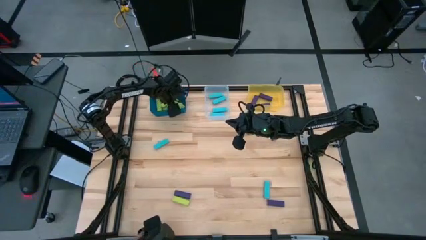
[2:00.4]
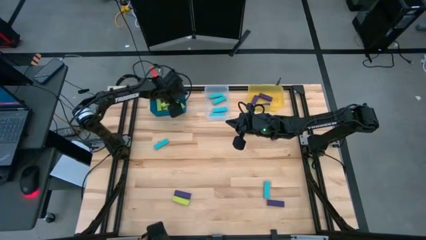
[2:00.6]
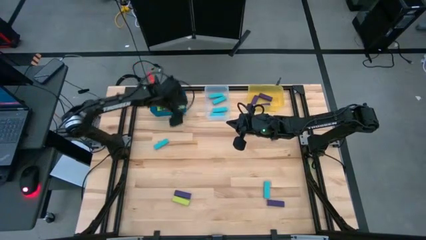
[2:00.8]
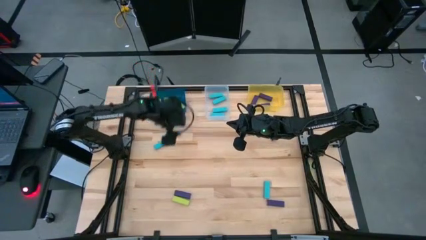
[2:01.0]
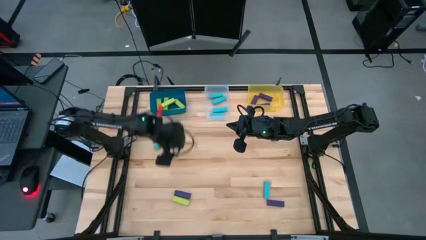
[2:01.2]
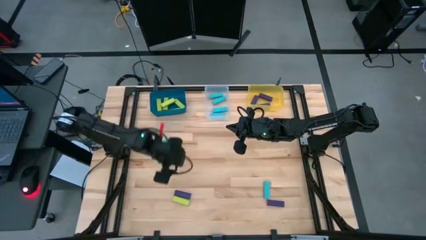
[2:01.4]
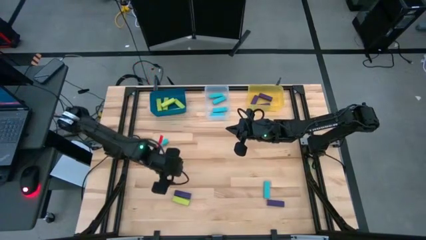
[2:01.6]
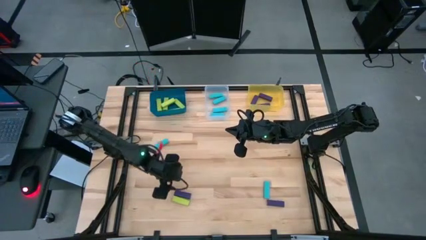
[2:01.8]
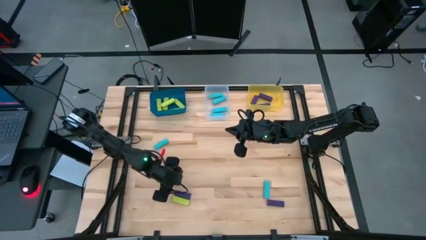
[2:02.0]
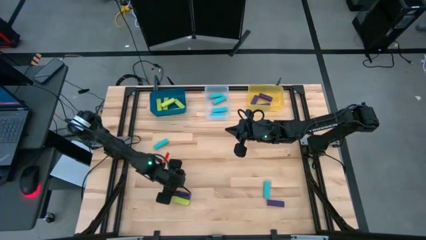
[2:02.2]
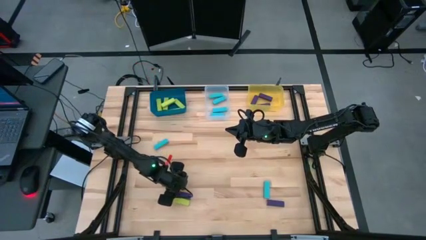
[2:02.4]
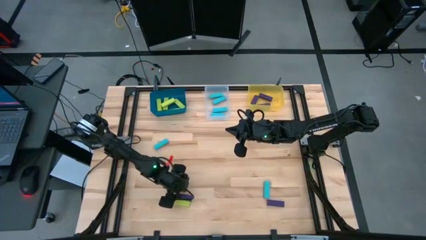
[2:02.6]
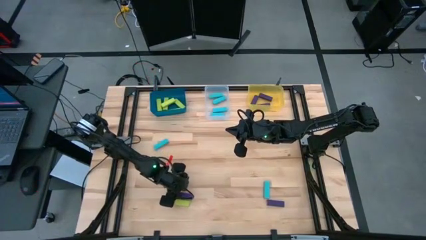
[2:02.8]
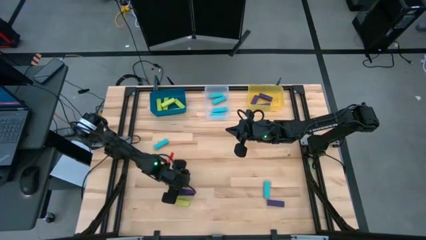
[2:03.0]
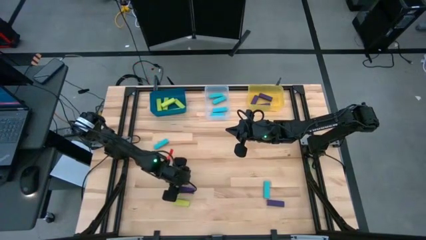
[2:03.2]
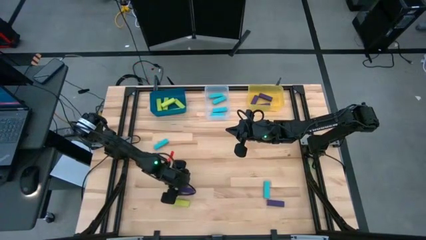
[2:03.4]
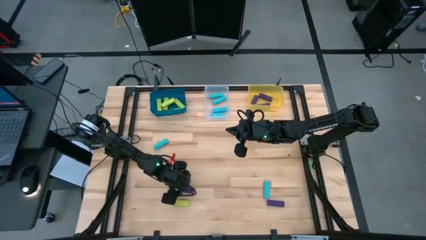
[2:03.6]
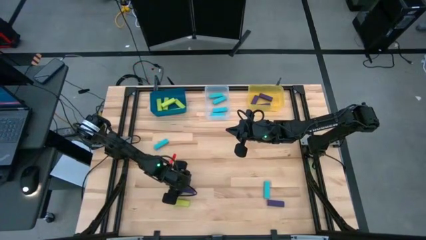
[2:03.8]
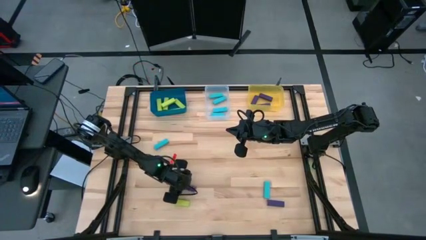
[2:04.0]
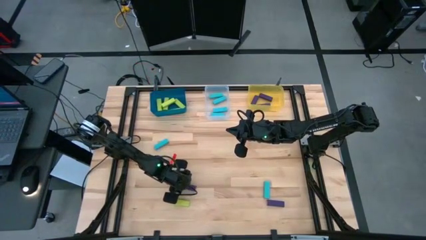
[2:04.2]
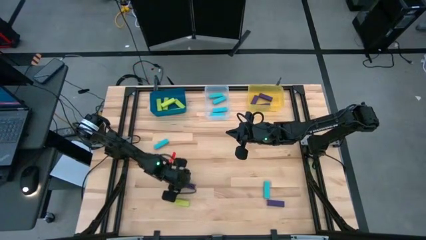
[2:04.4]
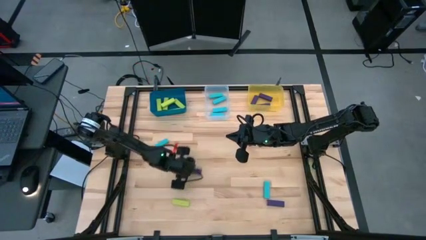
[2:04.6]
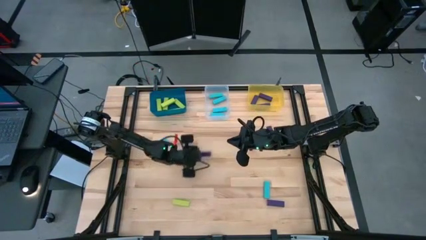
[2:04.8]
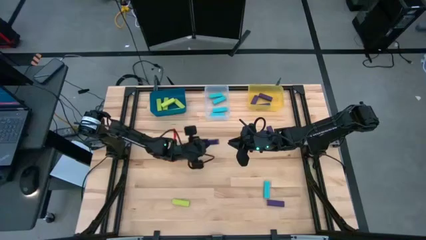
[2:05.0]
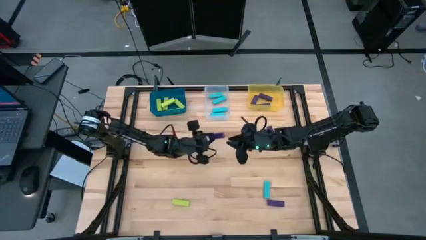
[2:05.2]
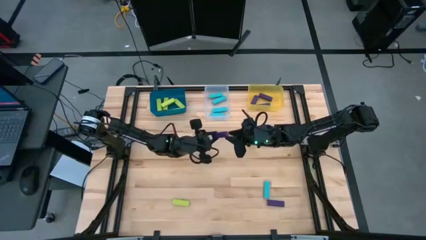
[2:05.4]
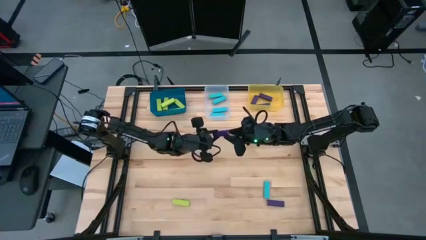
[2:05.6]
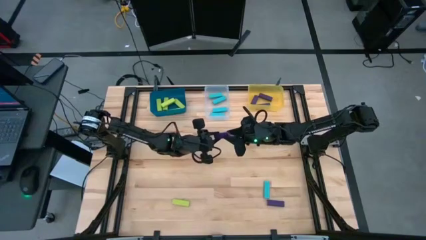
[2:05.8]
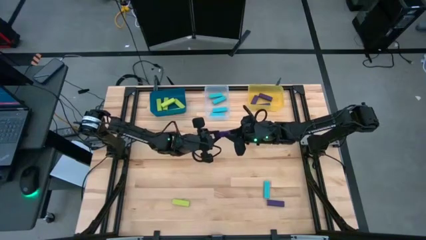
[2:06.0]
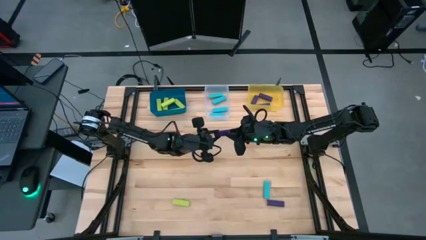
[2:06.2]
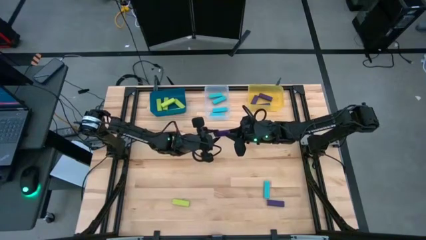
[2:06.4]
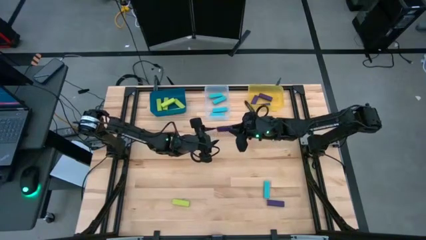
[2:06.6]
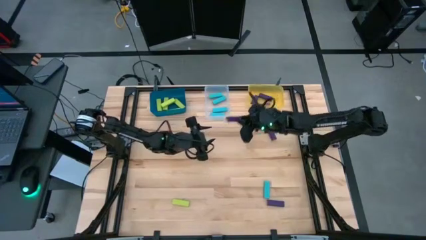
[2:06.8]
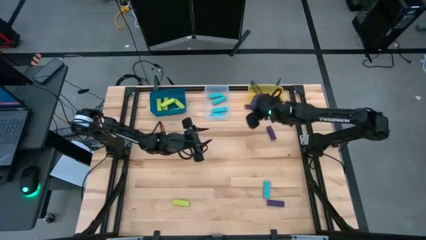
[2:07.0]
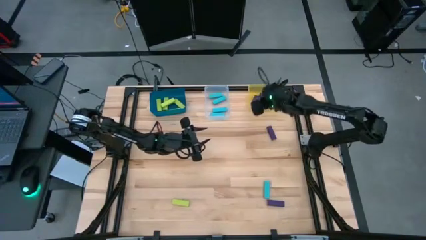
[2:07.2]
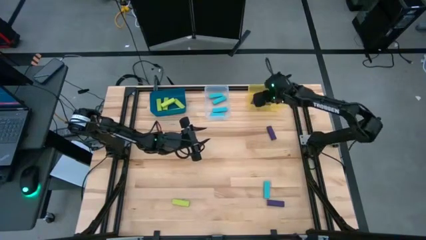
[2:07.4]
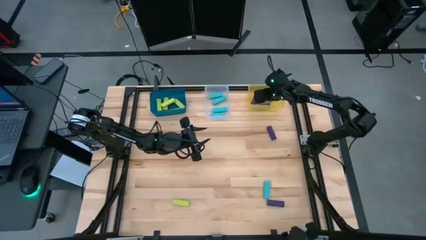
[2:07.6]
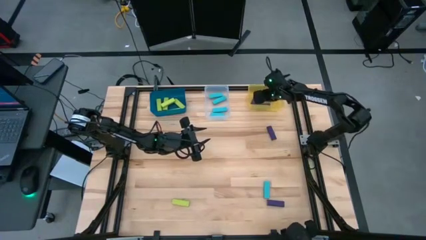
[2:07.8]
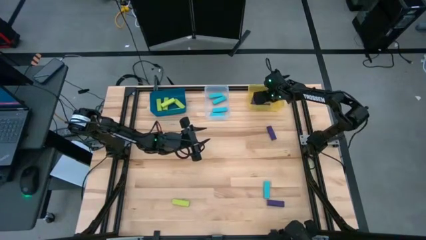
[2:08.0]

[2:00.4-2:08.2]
Task: Sort blocks
Put the violet block into the yellow bin

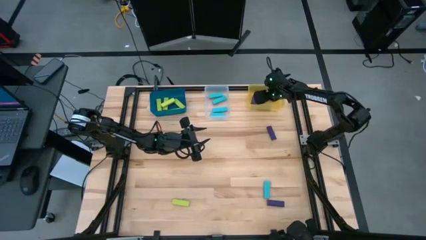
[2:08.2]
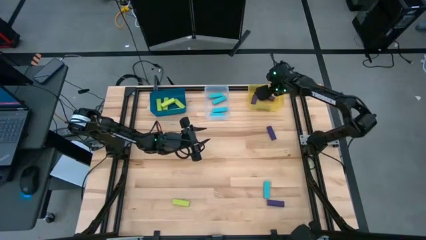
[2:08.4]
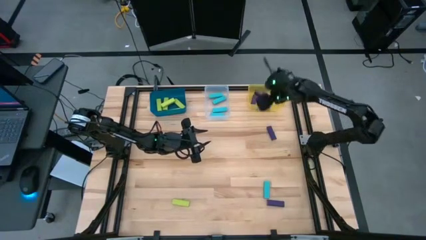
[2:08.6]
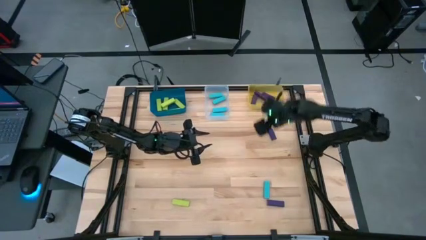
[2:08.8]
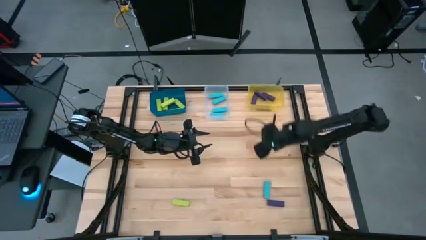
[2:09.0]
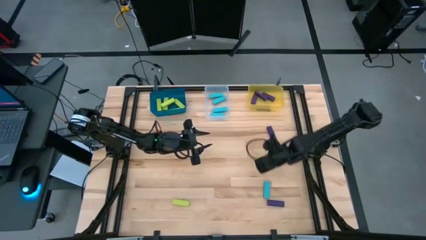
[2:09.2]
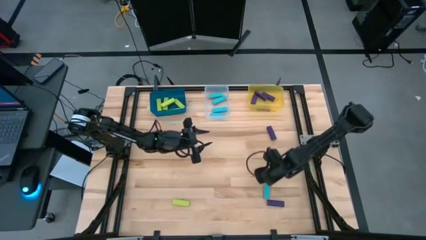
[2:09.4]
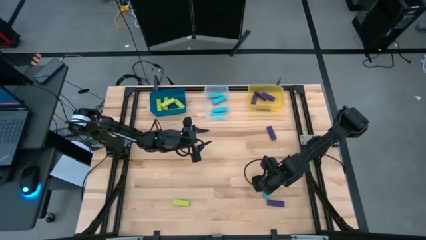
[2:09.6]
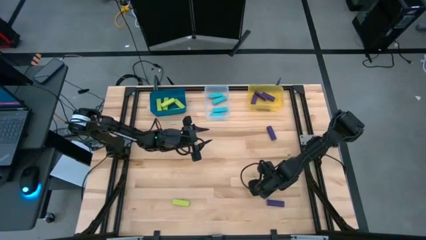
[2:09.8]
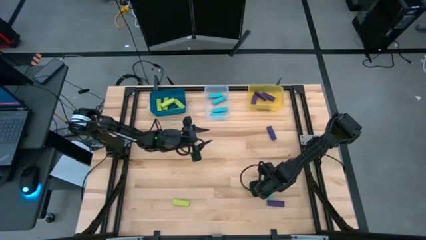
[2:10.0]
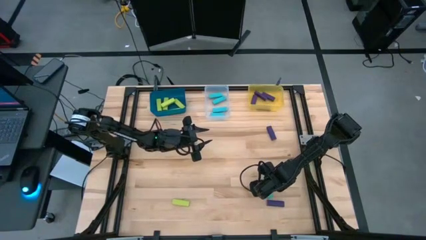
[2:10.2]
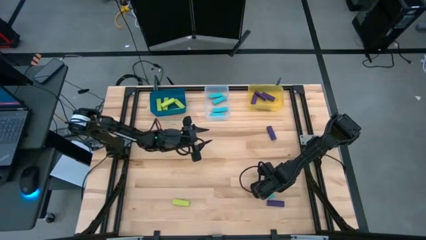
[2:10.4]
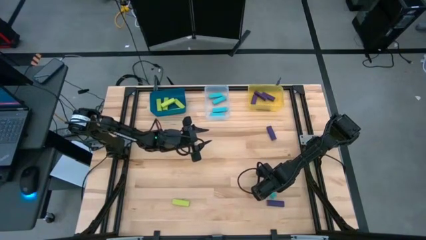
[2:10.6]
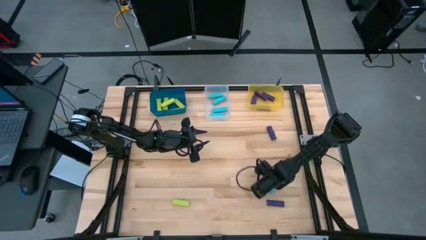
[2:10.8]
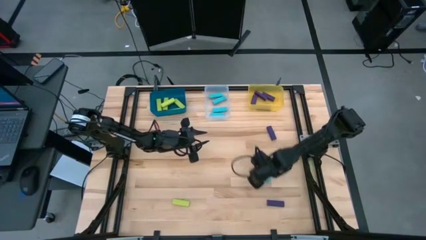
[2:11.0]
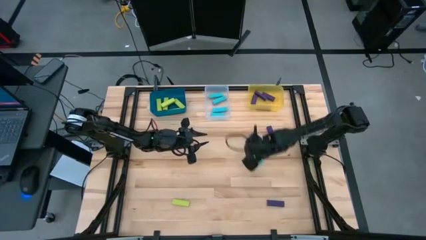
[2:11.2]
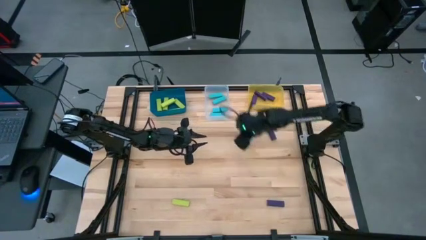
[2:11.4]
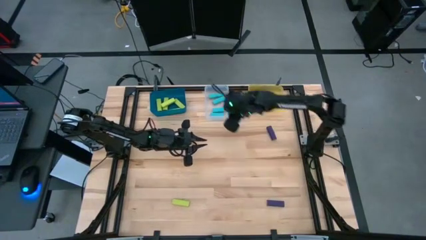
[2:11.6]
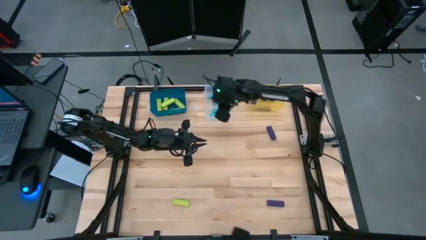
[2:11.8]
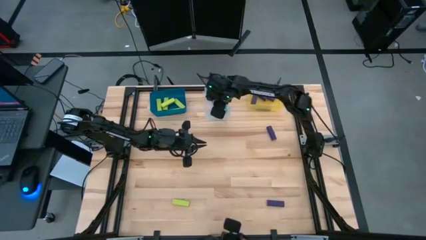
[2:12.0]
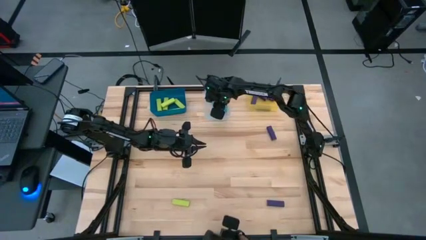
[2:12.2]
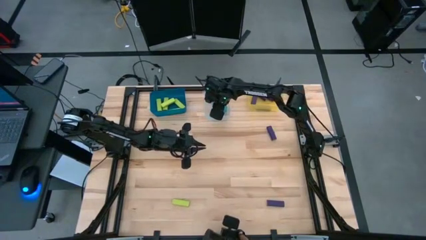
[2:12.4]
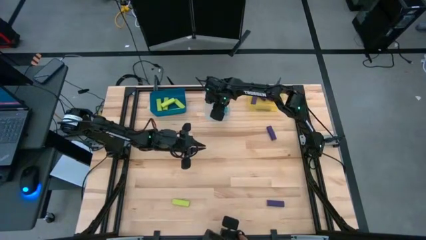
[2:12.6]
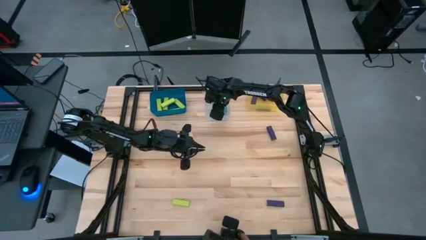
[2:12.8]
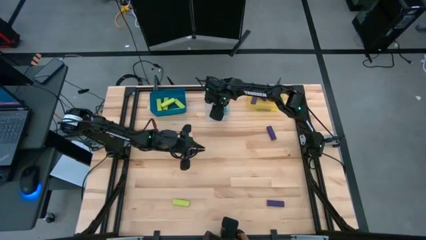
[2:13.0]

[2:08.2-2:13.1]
Put the blue block into the transparent bin

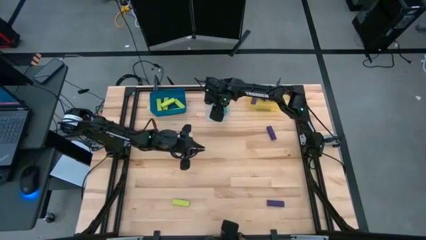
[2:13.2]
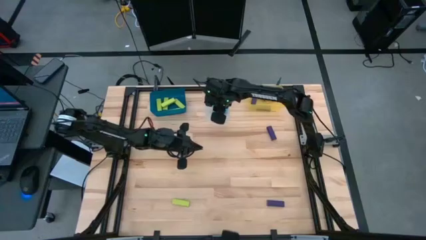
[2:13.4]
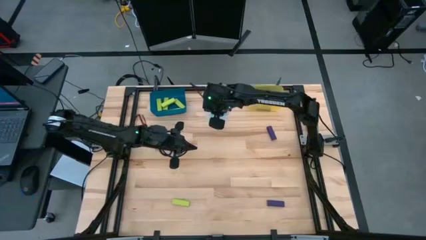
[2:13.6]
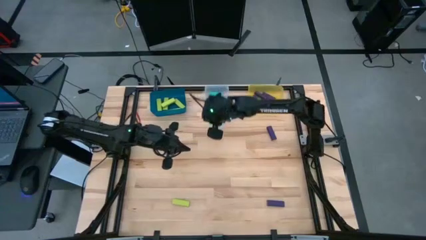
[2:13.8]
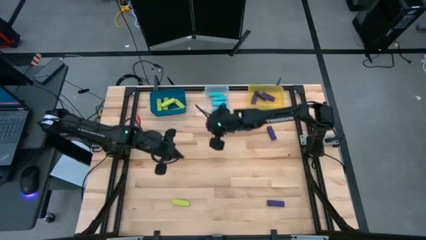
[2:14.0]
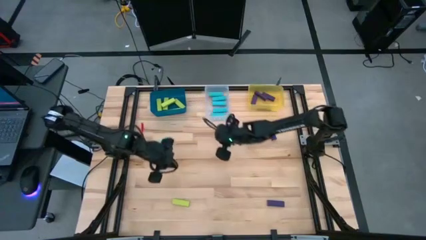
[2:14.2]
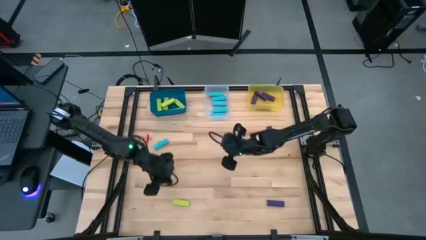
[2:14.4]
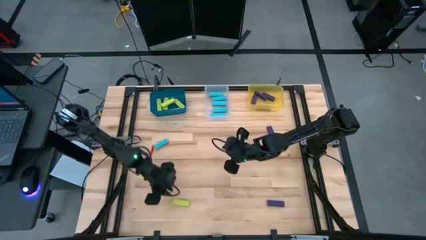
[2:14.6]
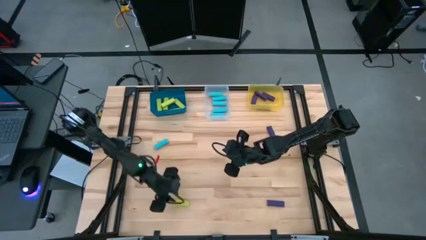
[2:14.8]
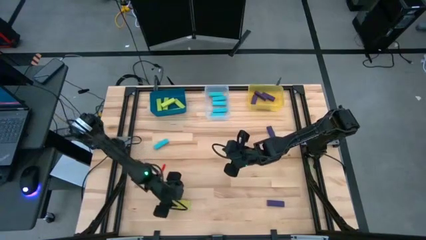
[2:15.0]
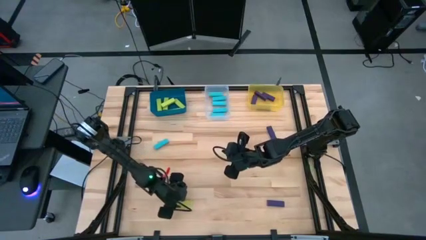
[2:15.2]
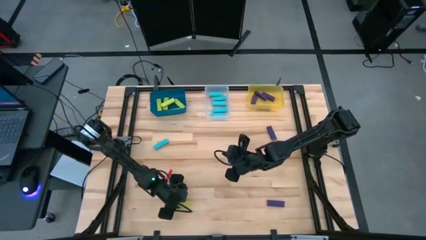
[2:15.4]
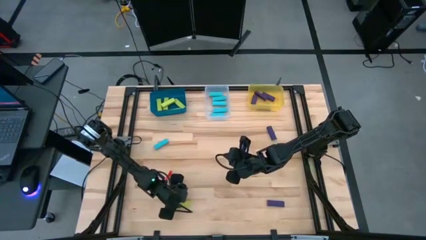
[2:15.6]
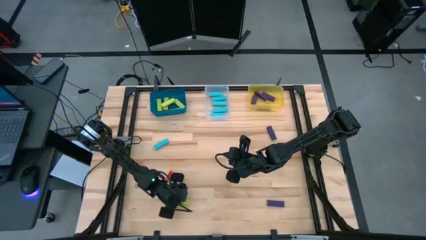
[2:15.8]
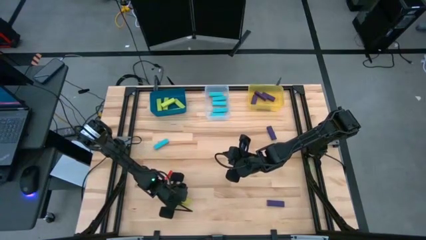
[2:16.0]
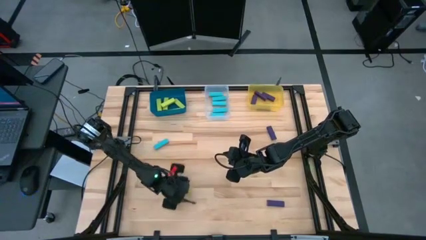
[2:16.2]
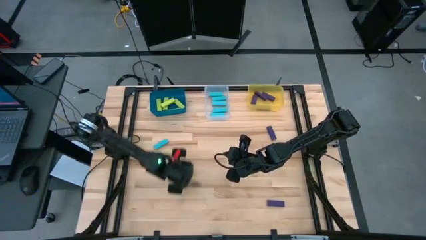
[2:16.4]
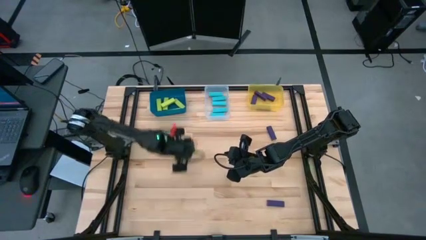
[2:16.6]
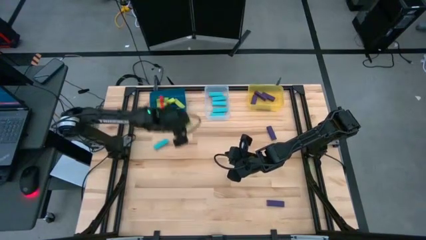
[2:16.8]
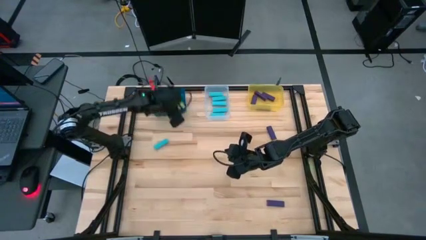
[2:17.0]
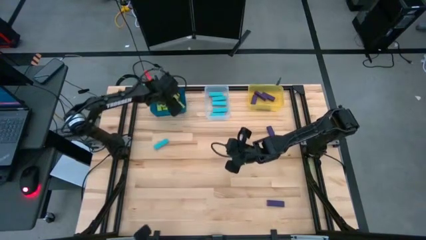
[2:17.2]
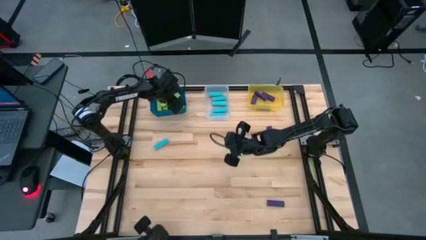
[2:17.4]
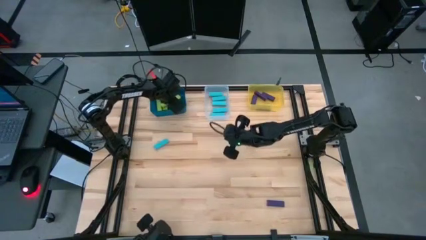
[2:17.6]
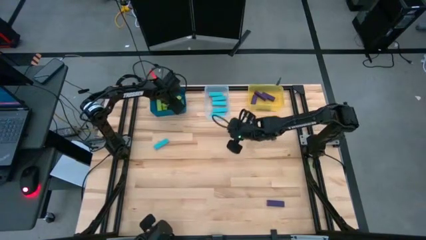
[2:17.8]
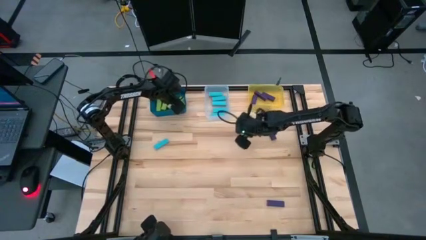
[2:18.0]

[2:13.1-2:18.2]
Put the green block into the blue bin
